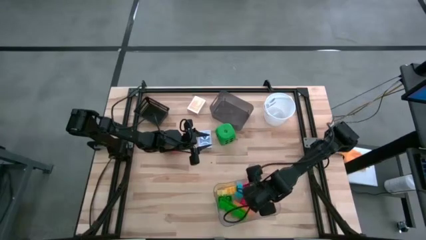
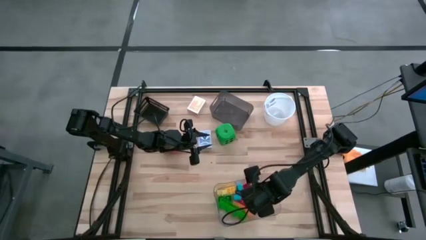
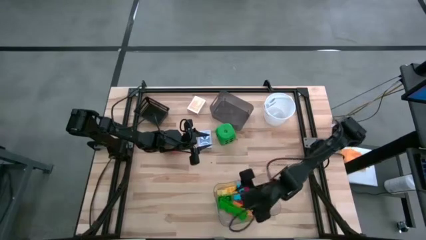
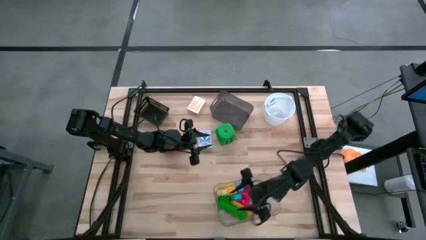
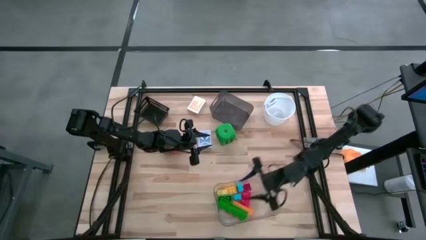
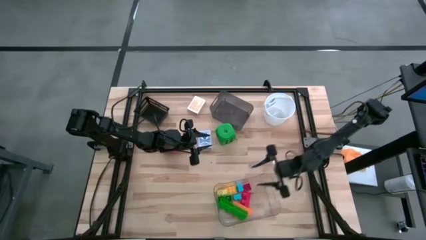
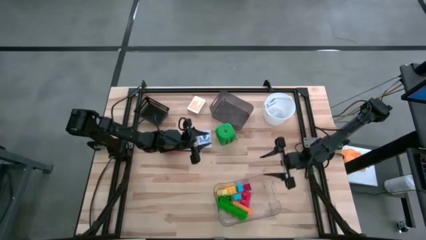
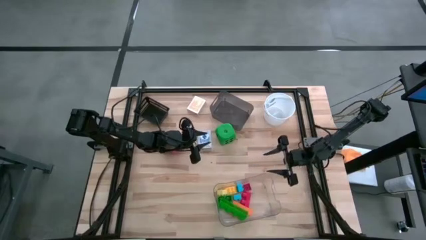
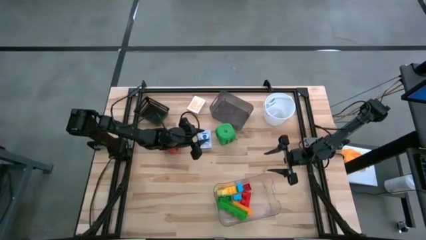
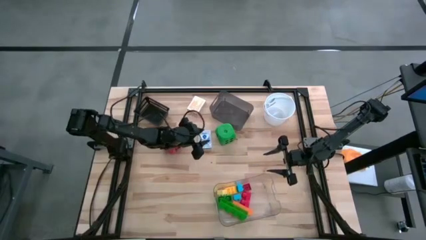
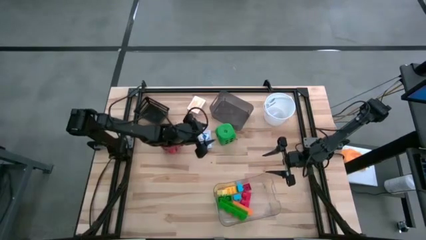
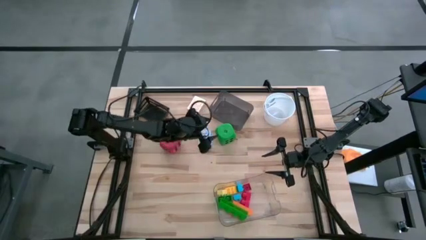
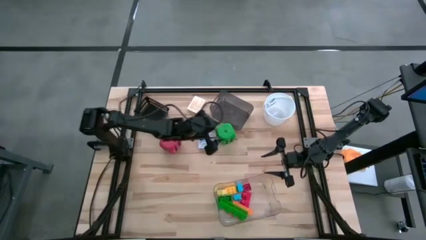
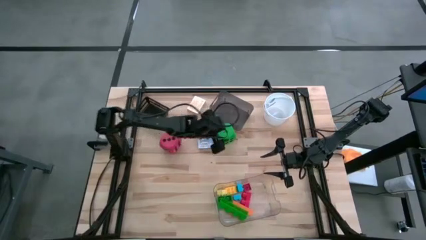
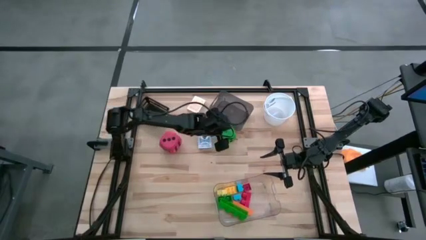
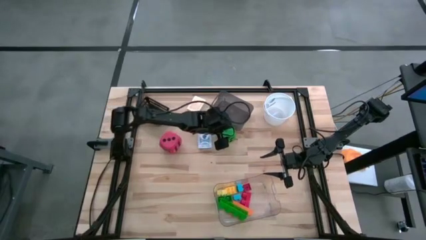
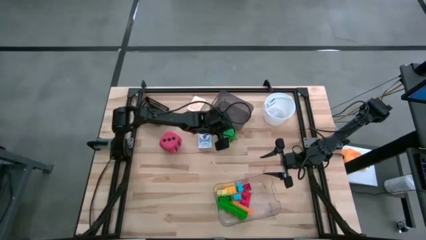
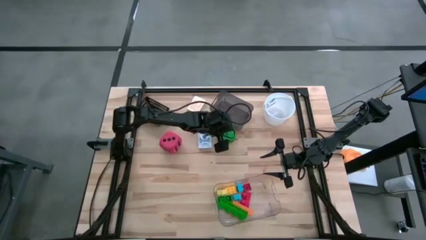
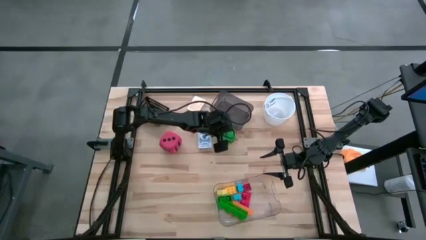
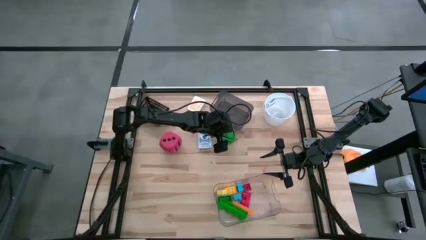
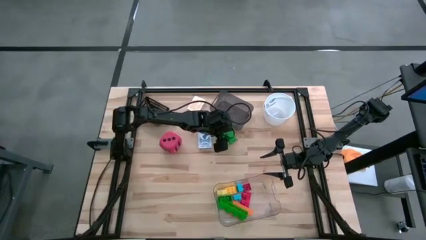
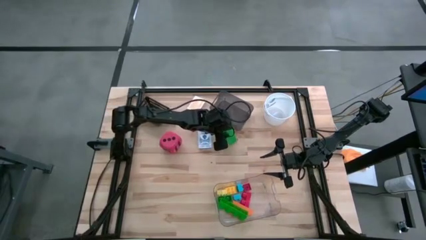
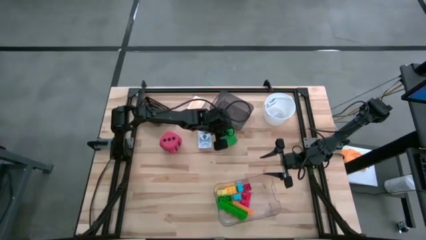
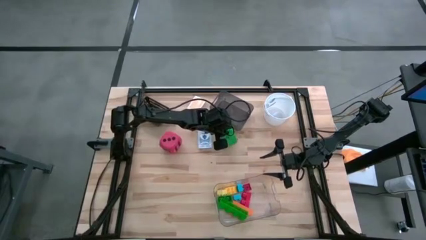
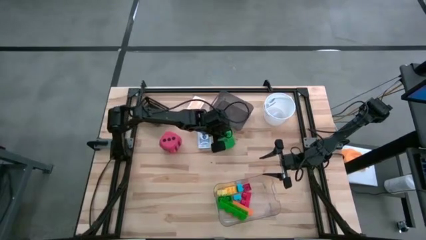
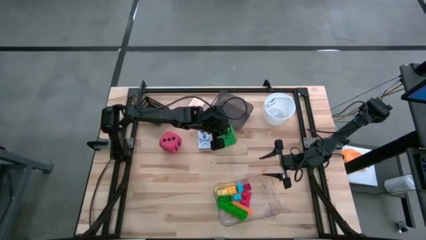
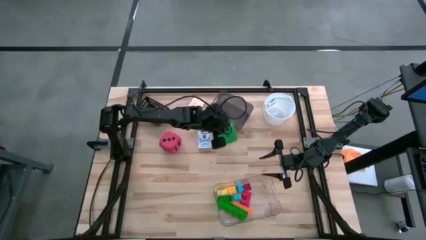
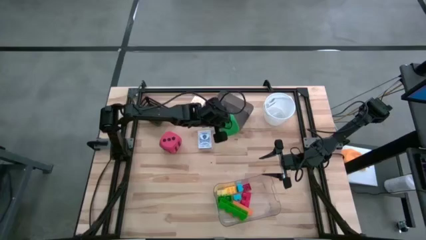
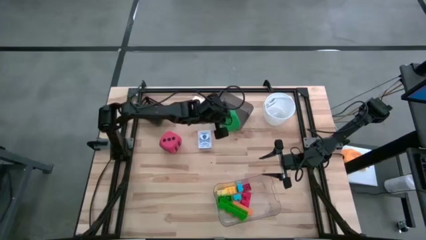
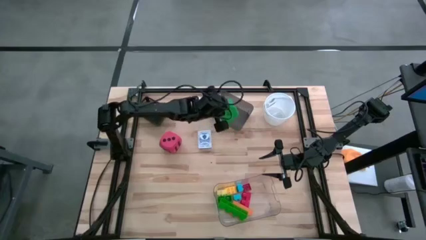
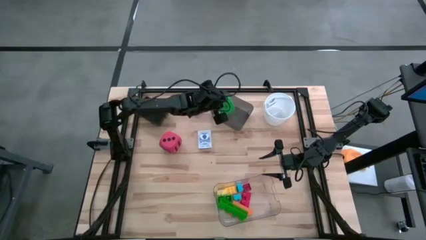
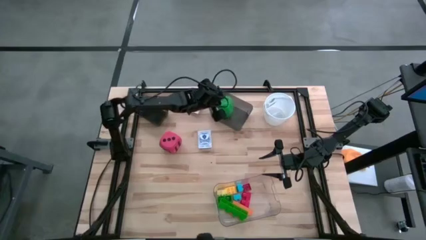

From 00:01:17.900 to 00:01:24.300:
Task: Pick & Place Toys
Put the green die into the top right transparent black bin

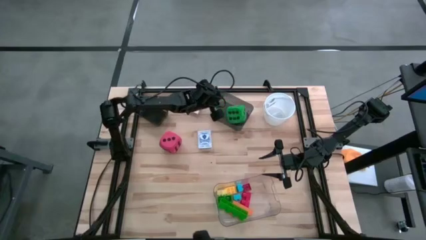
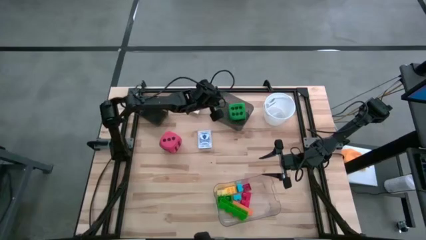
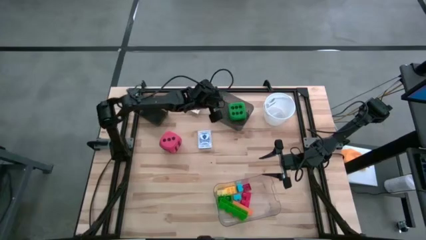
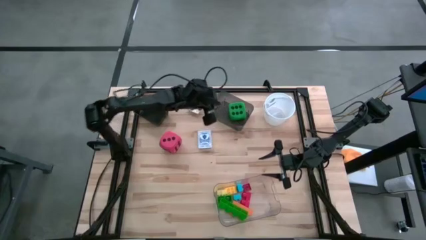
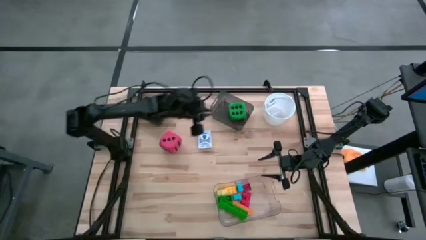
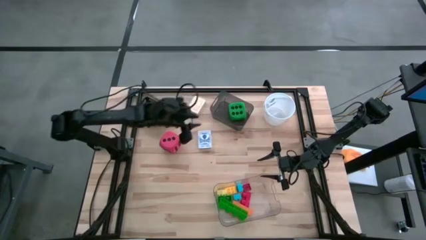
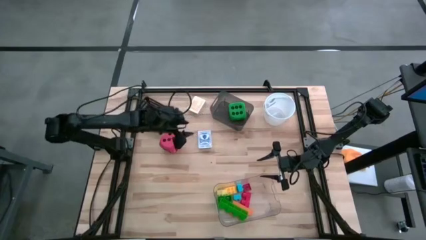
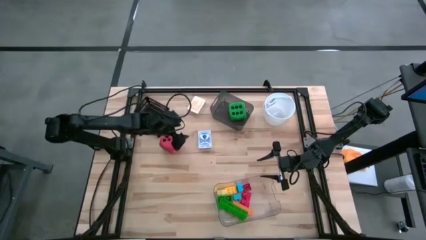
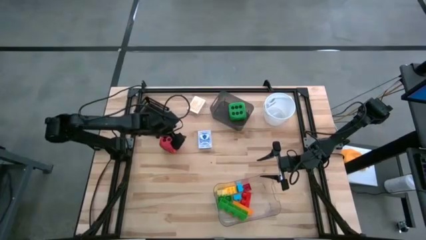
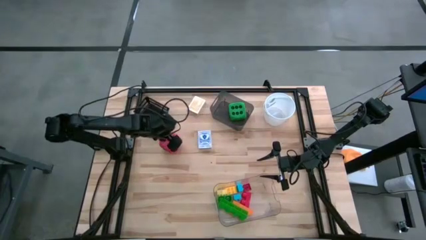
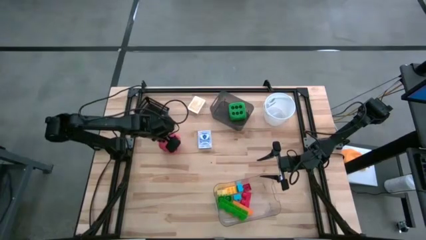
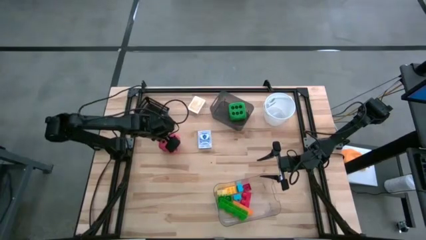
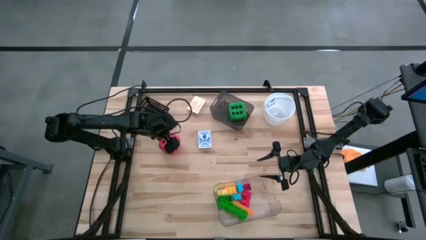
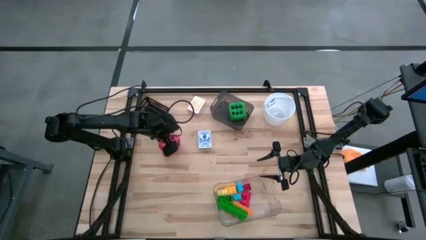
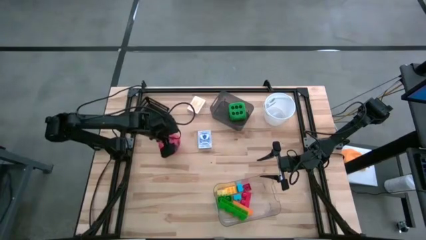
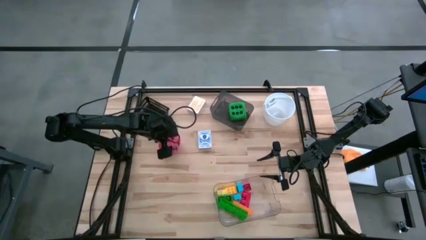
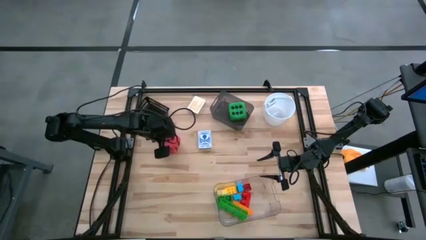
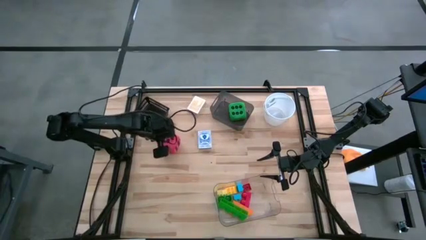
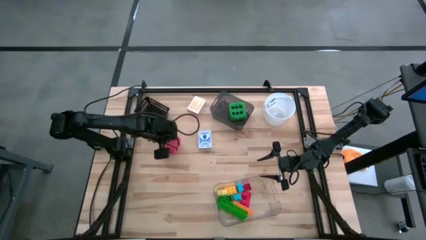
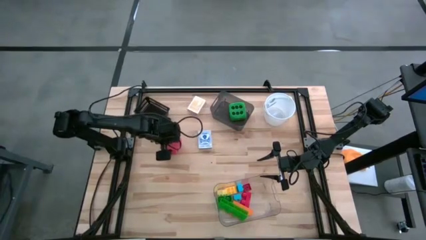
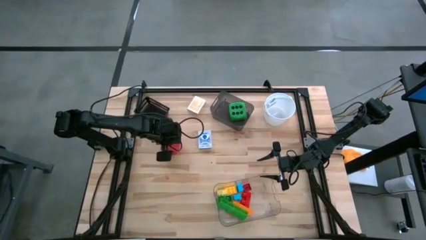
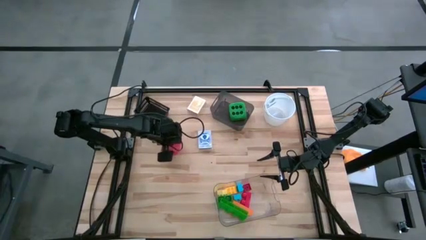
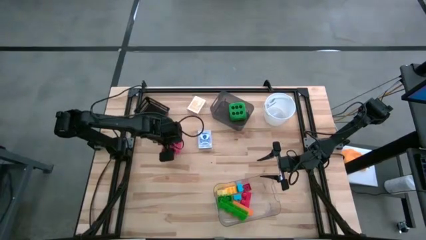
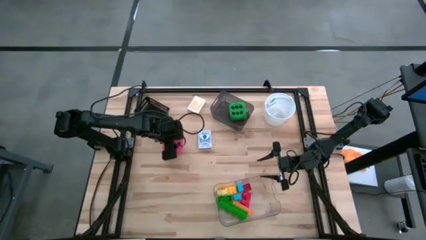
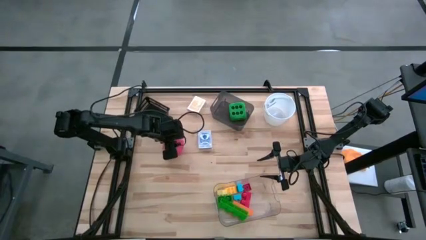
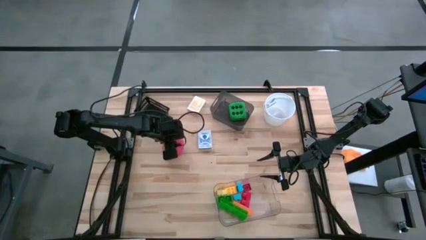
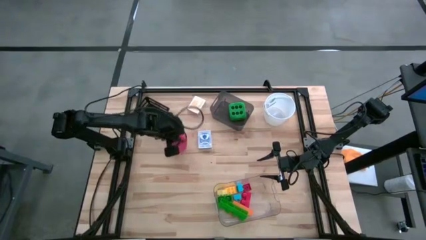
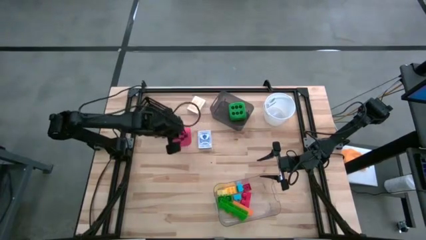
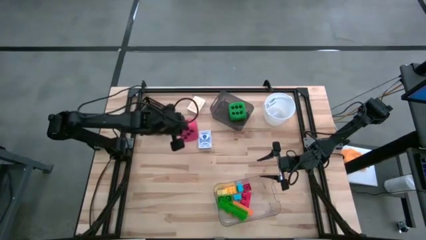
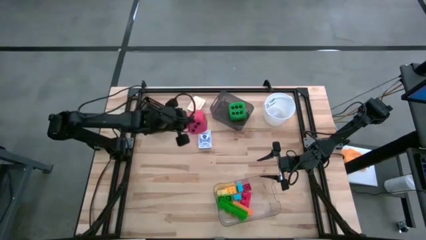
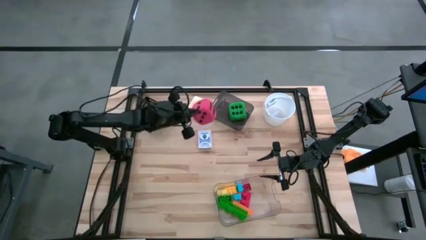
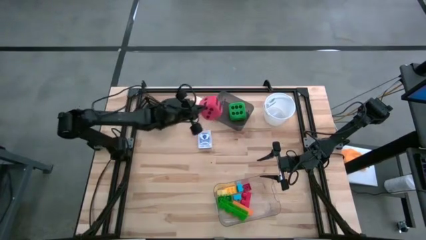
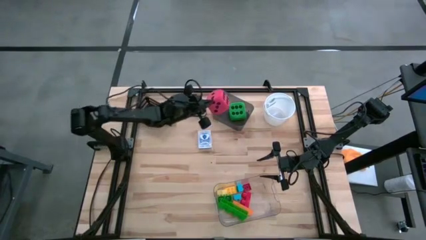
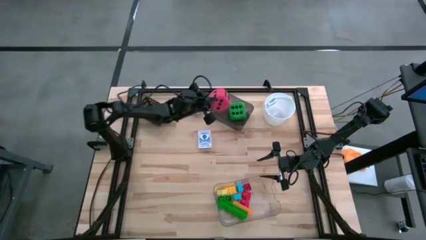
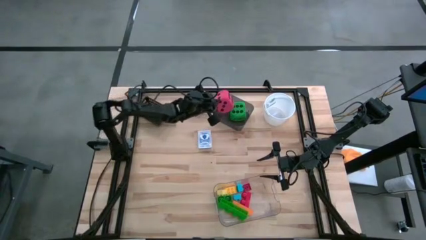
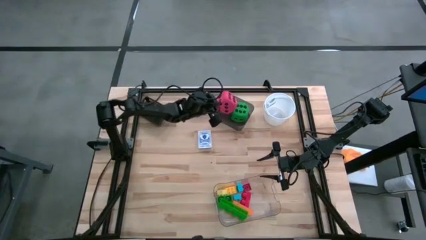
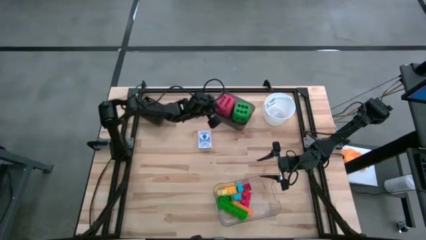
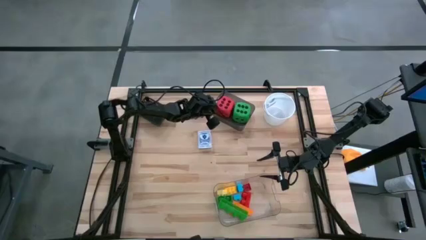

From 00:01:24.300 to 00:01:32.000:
Put the red die into the top right transparent black bin
